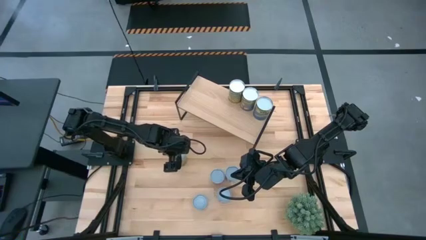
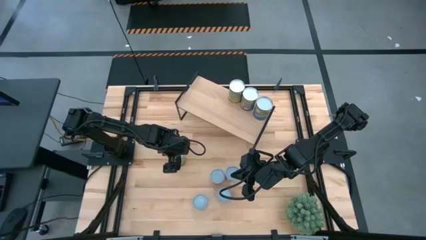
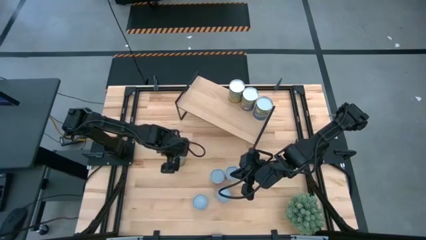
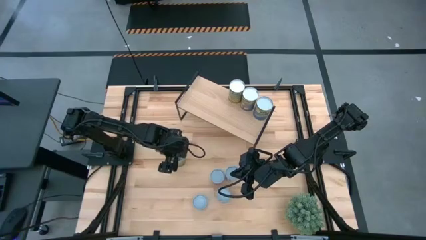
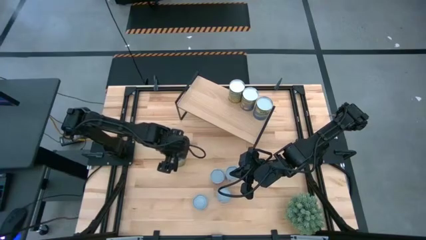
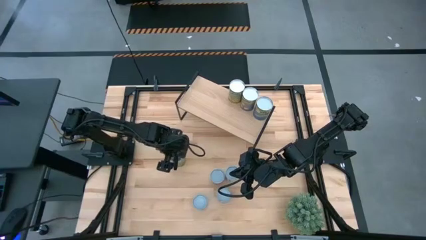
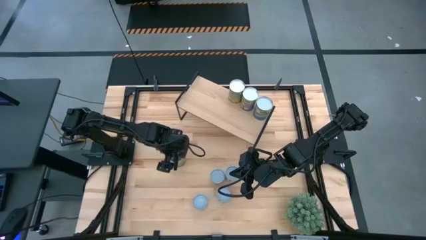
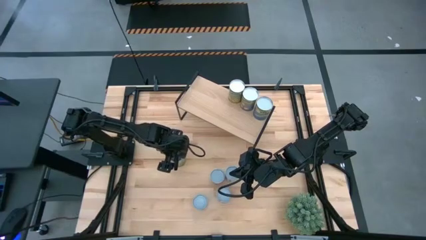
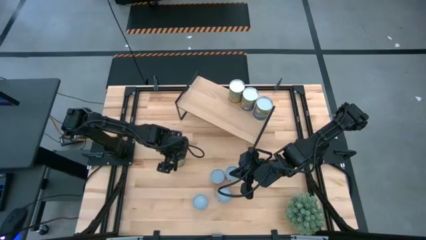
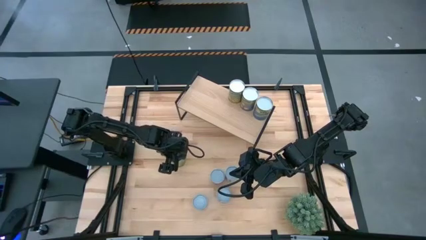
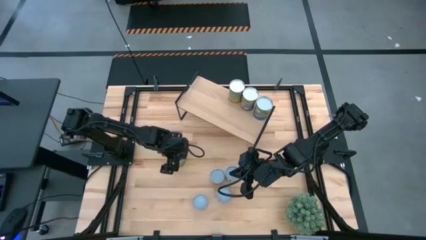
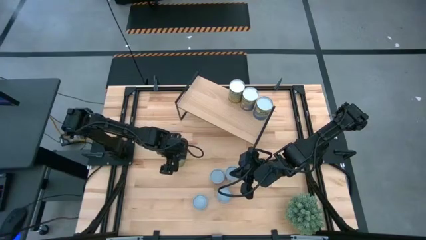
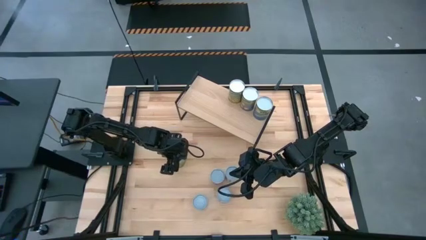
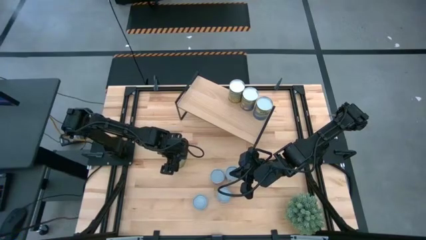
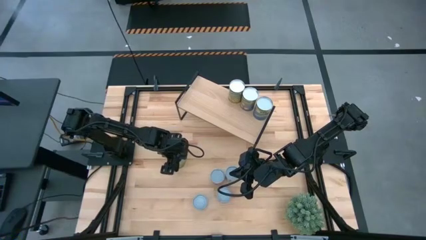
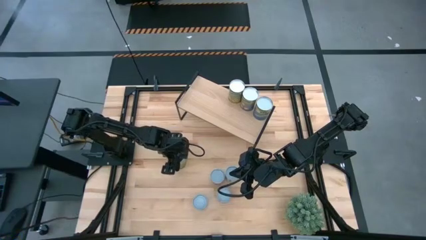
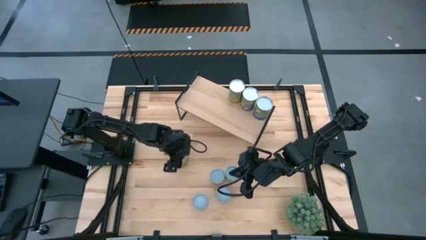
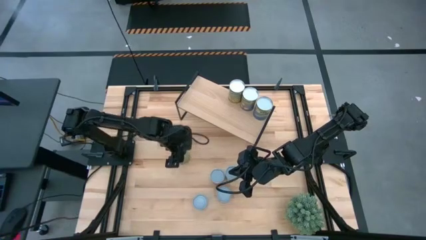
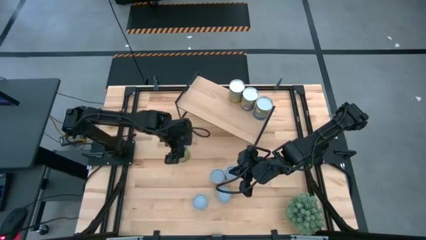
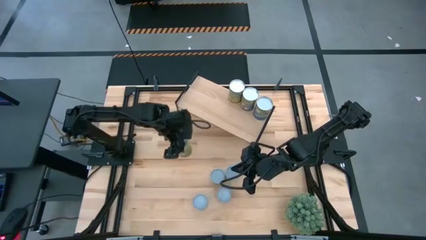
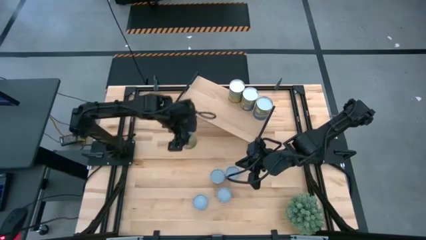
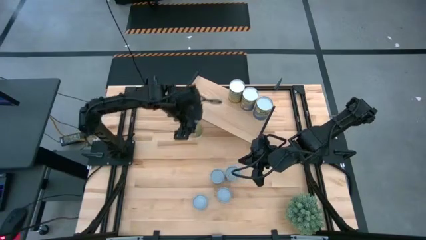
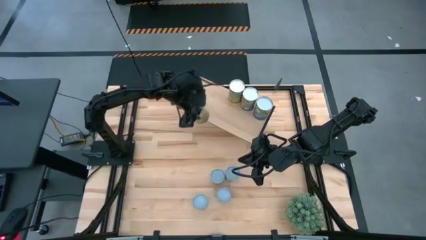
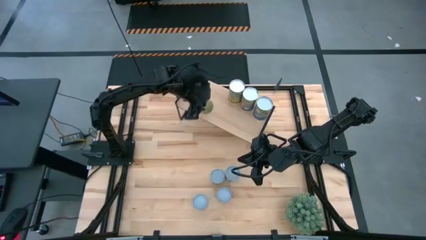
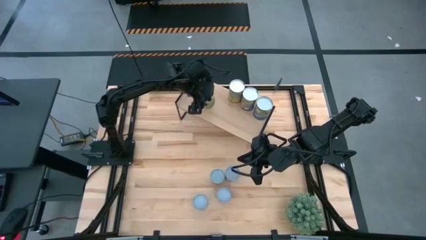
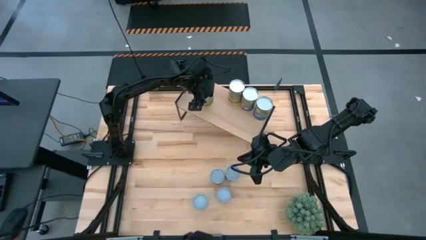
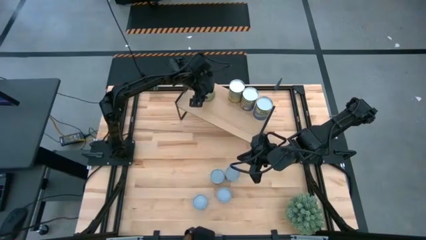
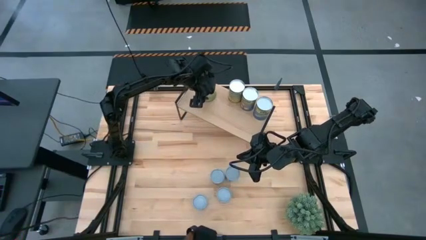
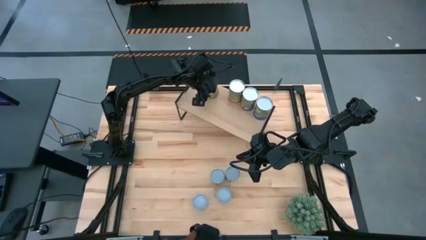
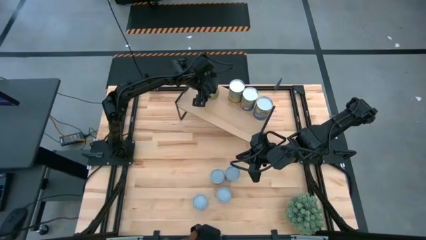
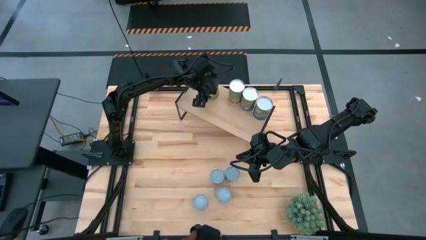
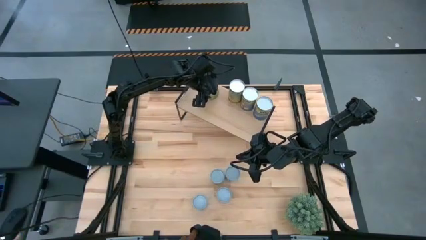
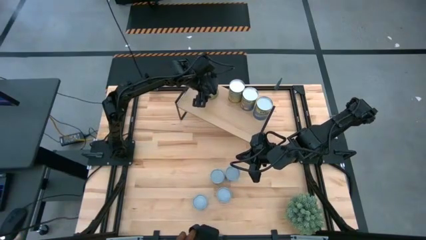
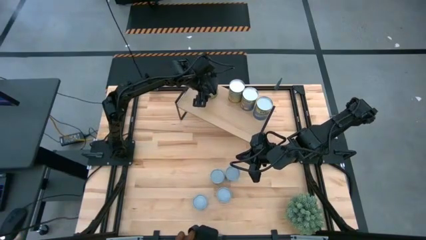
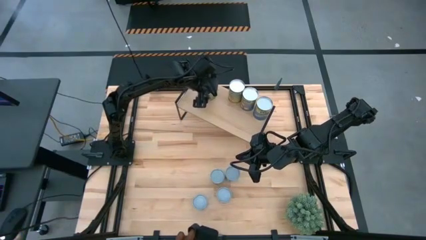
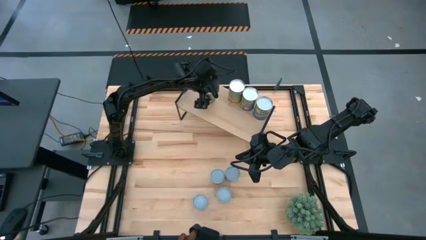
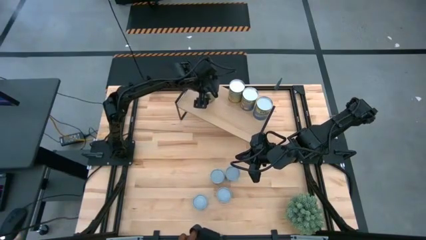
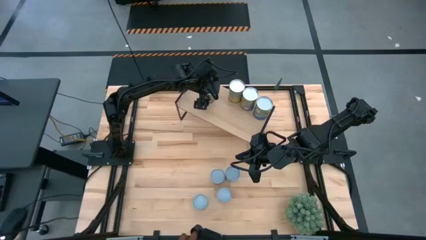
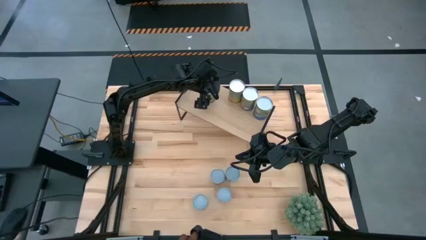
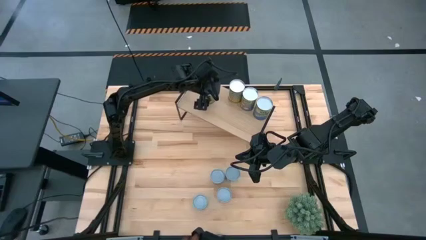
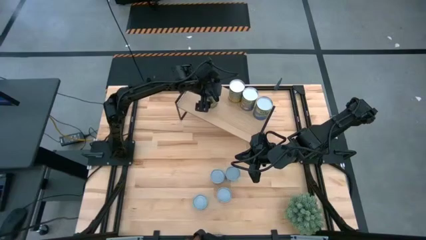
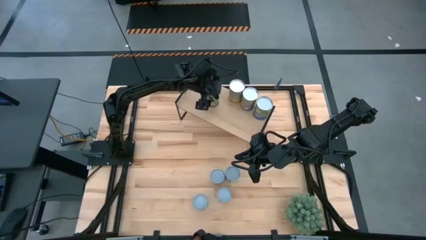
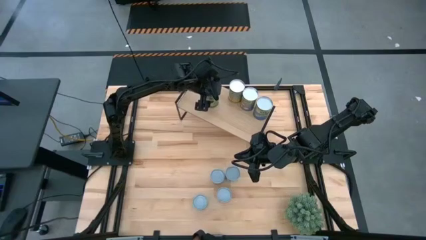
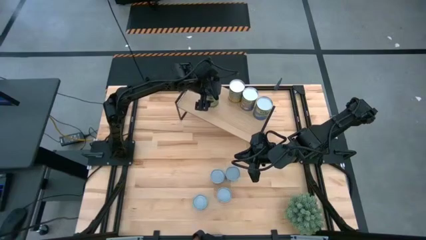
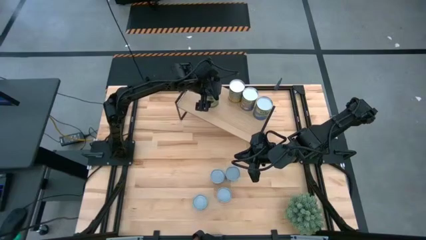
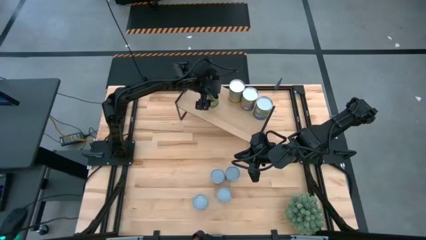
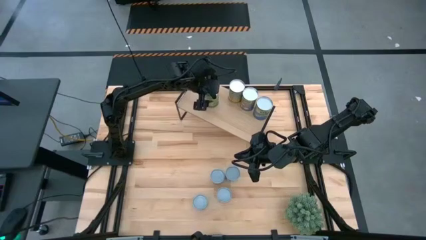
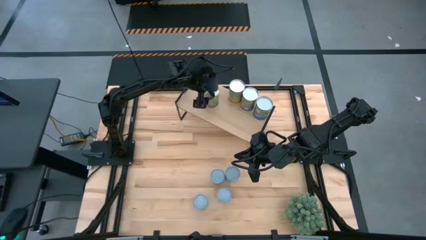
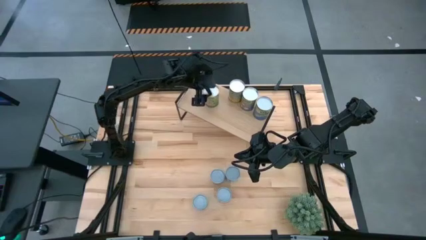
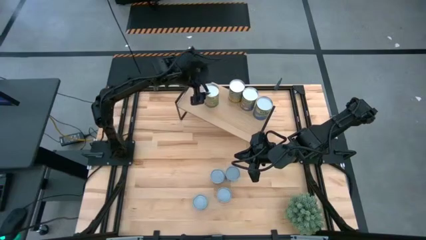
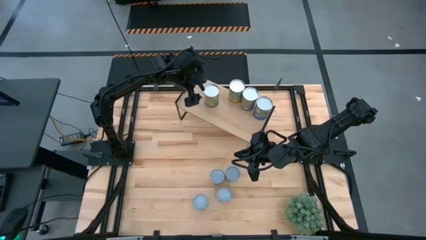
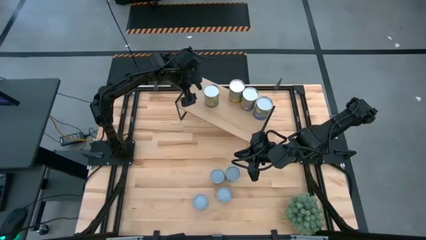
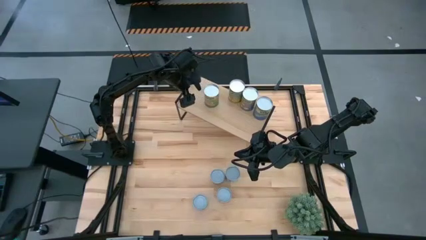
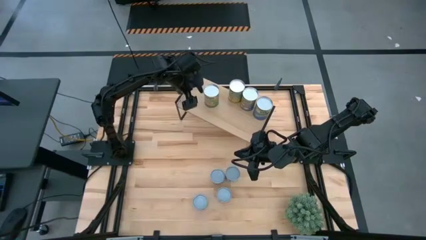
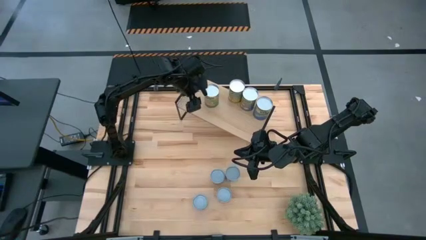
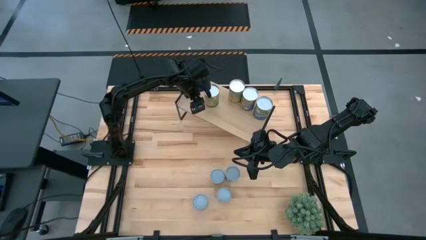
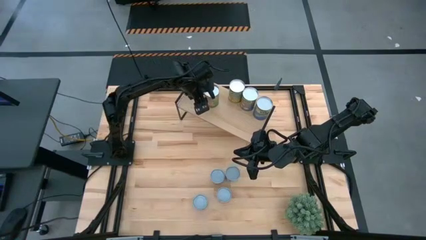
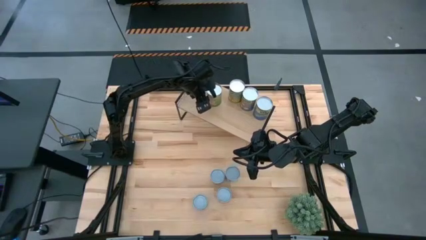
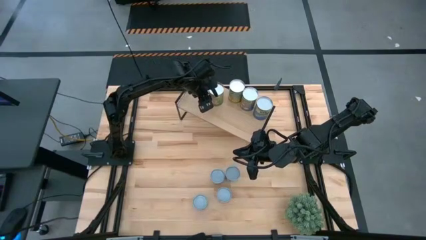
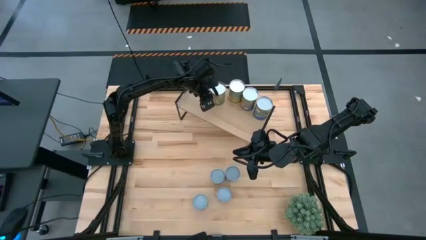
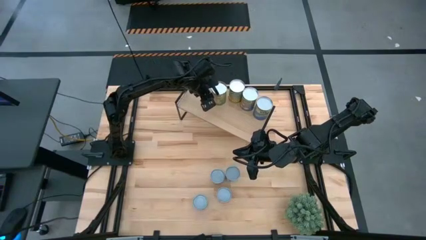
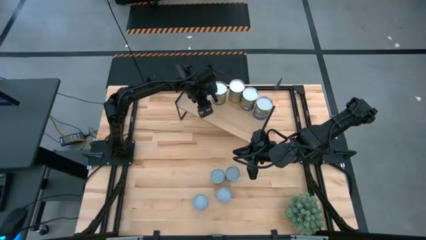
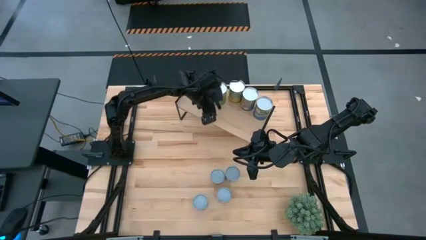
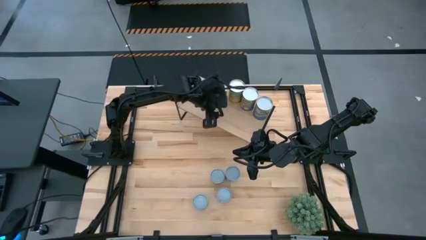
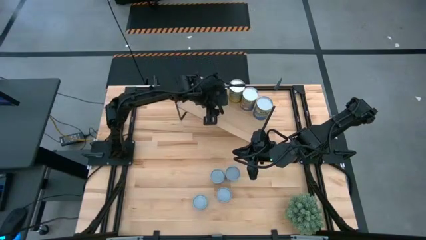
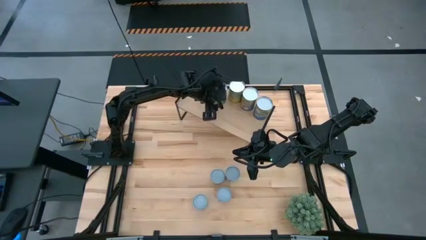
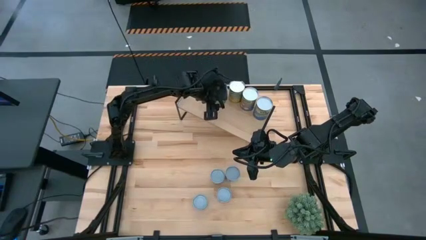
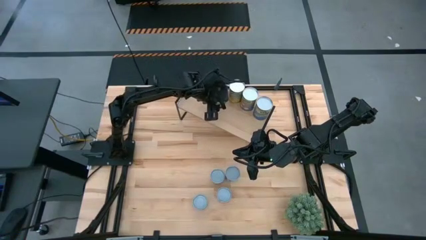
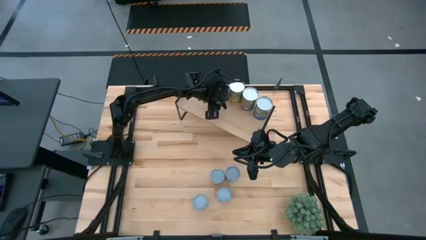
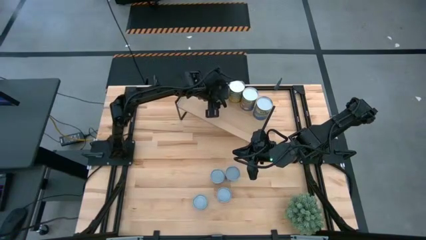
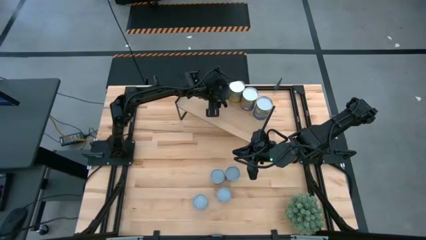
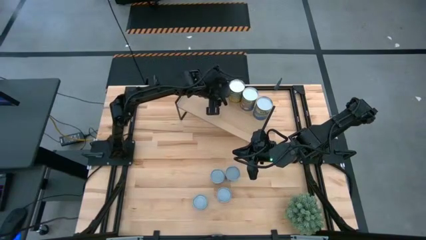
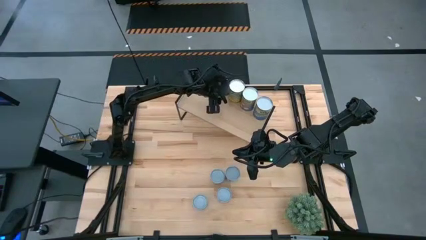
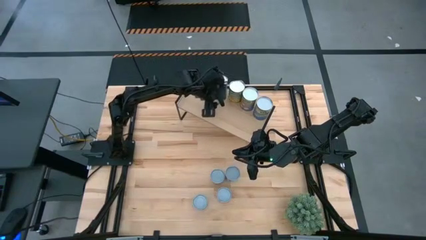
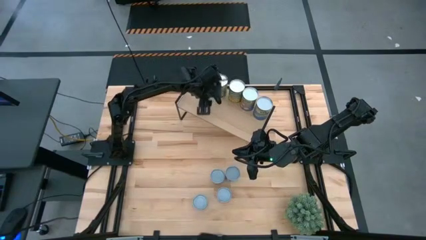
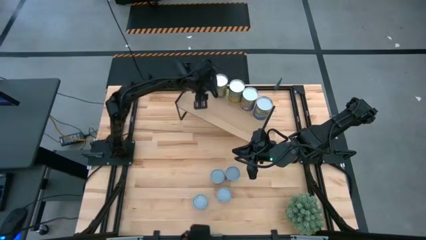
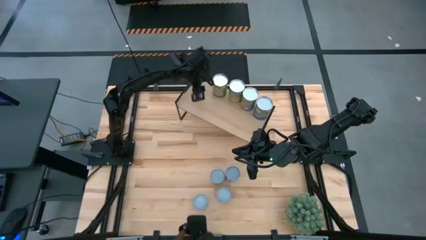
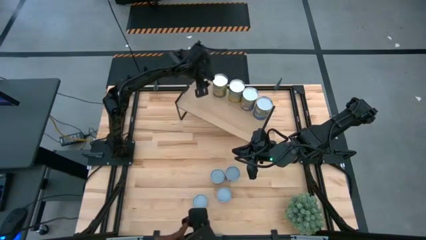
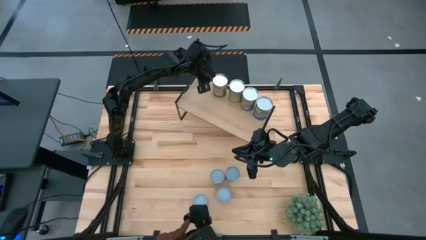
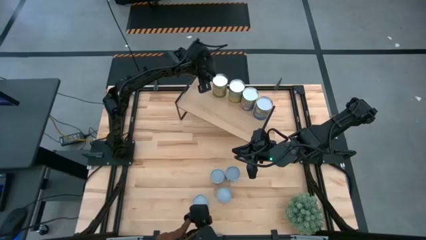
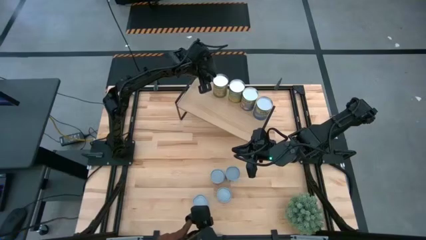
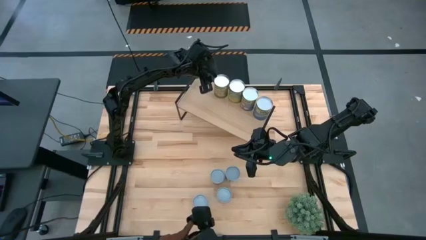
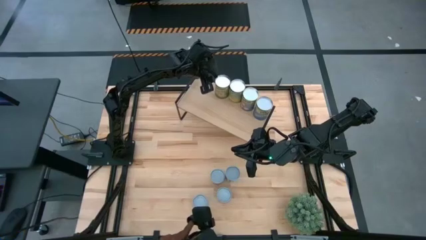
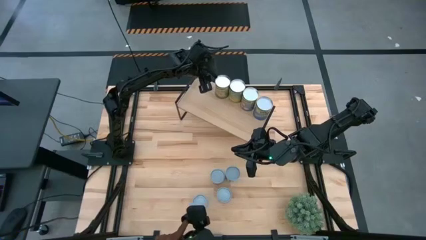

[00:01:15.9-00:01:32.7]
Task: Pick and place cans onto a shelf
Put the canned oranges on the shelf
